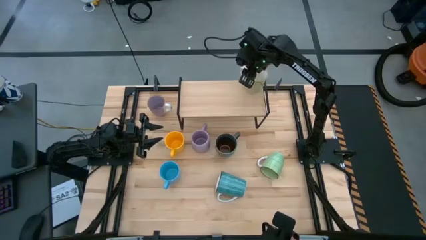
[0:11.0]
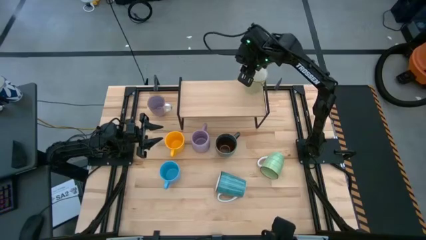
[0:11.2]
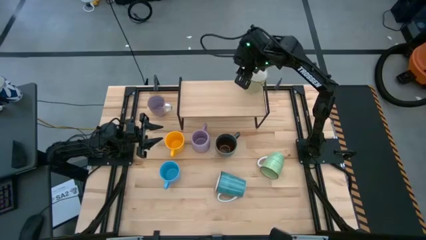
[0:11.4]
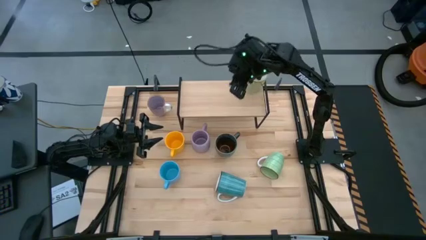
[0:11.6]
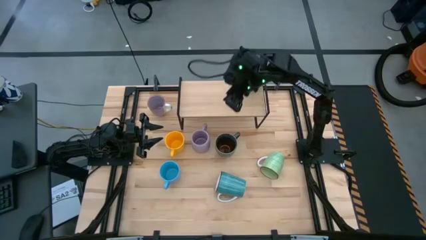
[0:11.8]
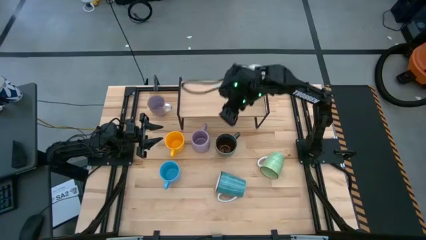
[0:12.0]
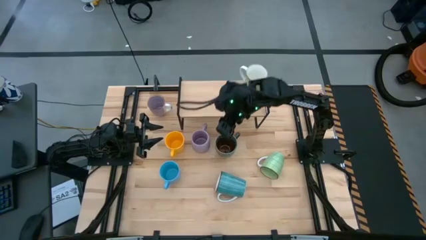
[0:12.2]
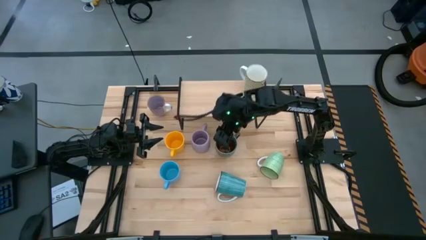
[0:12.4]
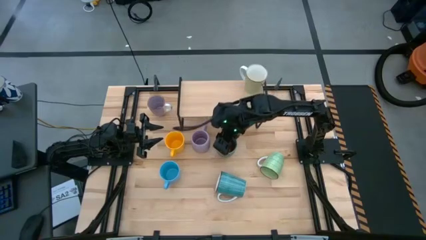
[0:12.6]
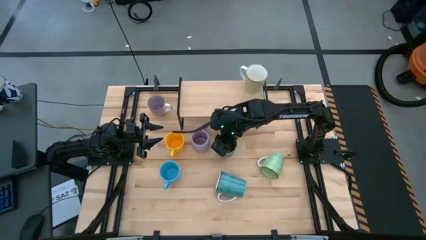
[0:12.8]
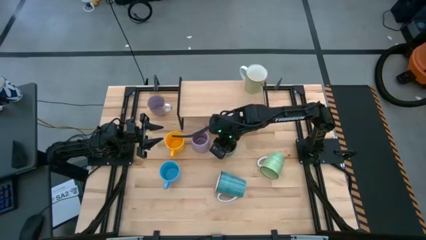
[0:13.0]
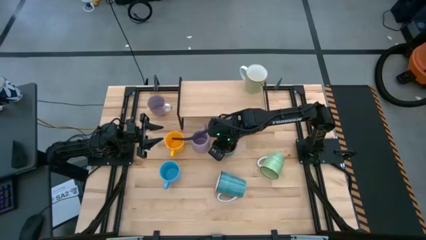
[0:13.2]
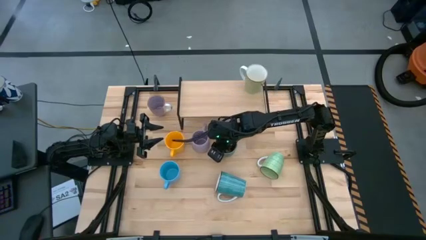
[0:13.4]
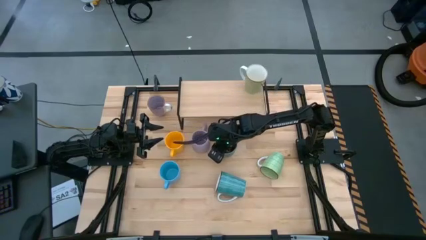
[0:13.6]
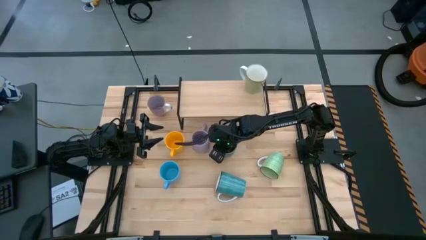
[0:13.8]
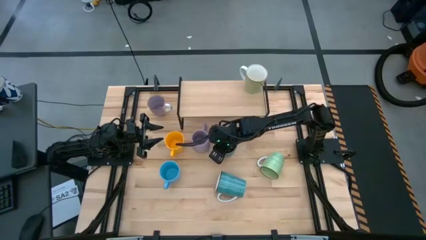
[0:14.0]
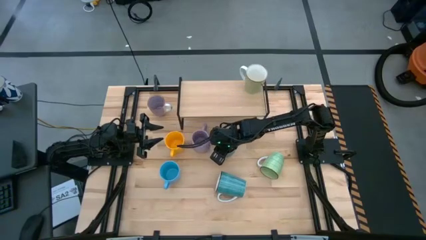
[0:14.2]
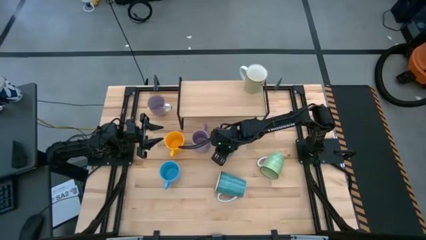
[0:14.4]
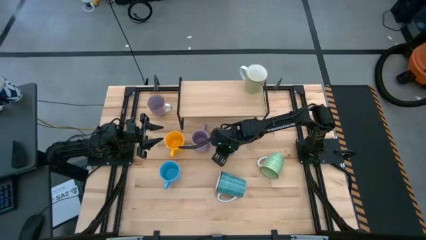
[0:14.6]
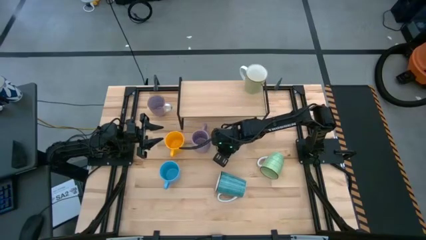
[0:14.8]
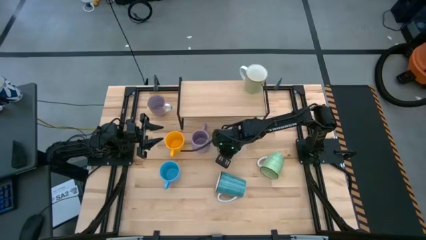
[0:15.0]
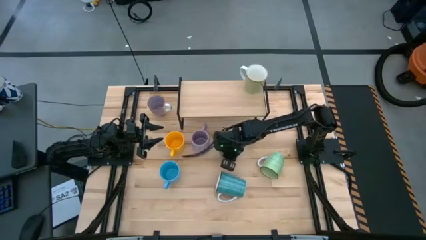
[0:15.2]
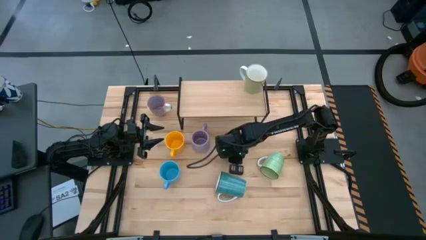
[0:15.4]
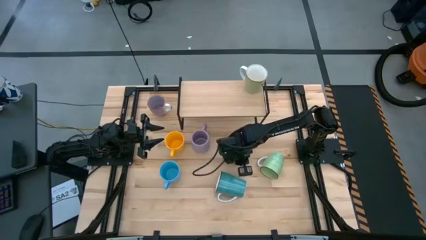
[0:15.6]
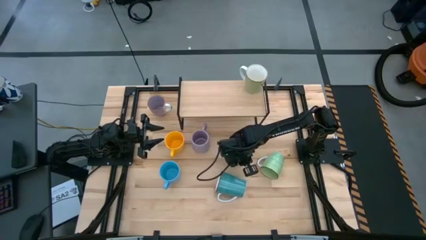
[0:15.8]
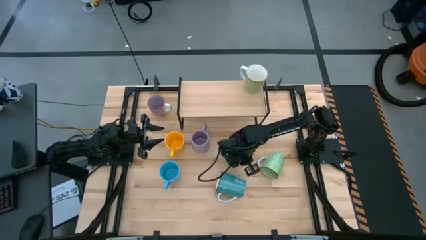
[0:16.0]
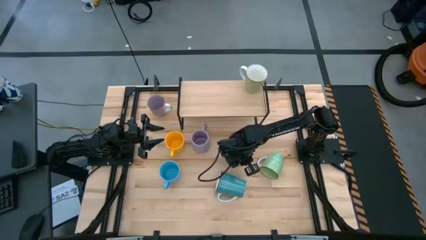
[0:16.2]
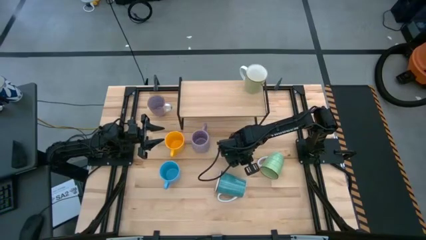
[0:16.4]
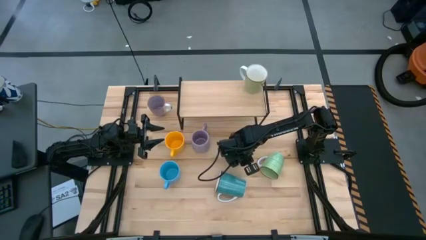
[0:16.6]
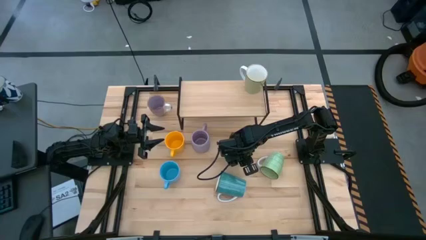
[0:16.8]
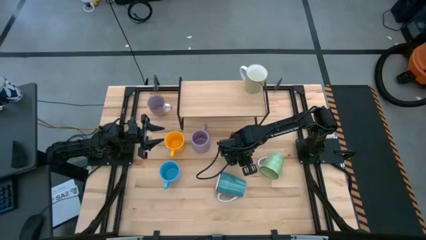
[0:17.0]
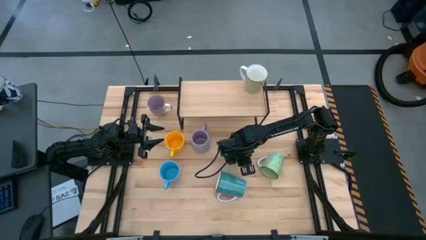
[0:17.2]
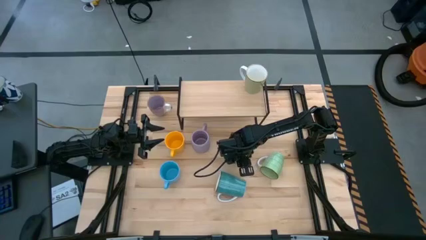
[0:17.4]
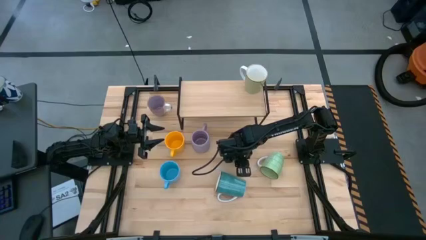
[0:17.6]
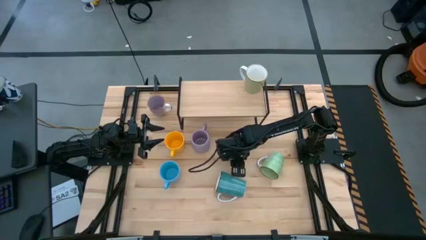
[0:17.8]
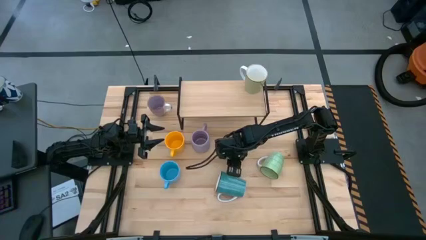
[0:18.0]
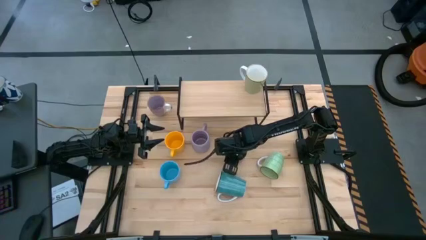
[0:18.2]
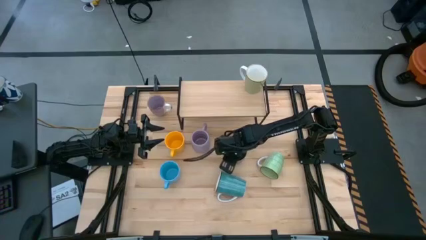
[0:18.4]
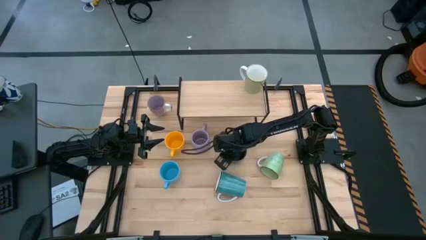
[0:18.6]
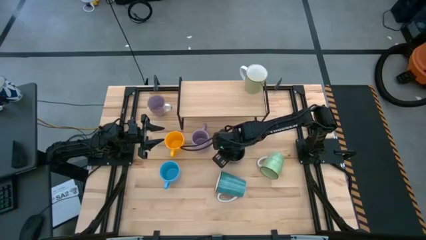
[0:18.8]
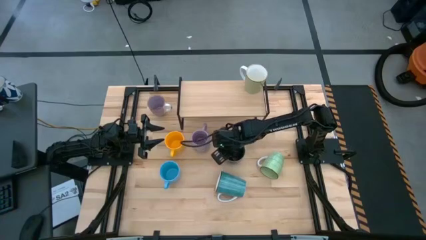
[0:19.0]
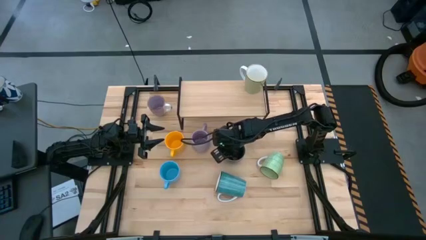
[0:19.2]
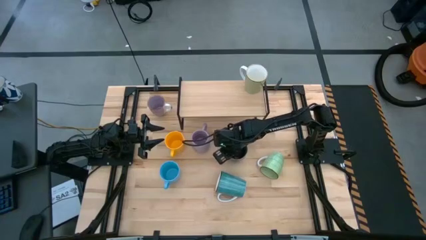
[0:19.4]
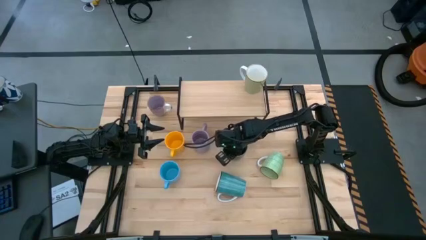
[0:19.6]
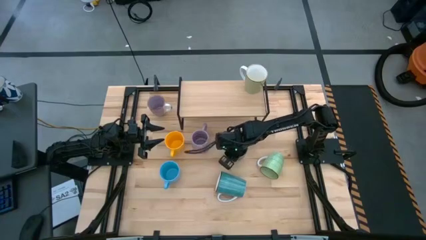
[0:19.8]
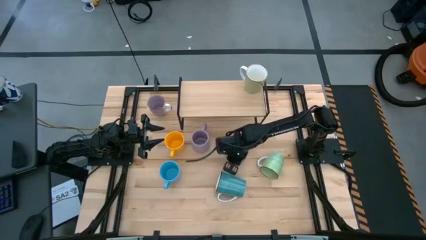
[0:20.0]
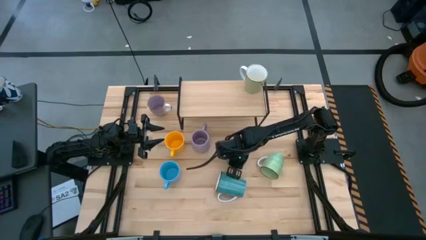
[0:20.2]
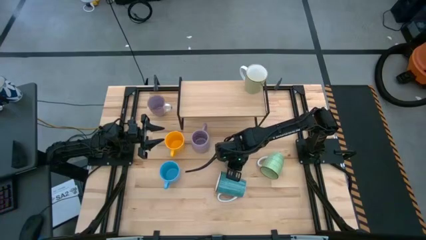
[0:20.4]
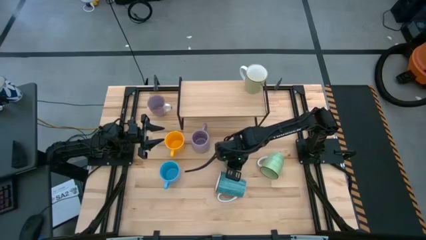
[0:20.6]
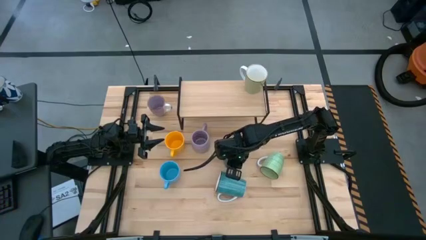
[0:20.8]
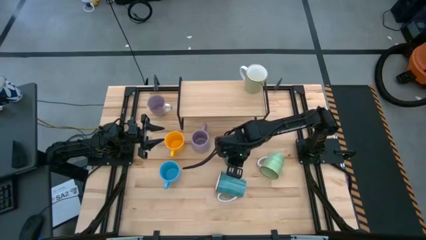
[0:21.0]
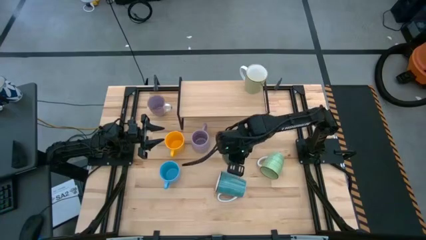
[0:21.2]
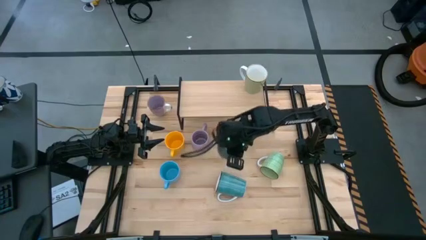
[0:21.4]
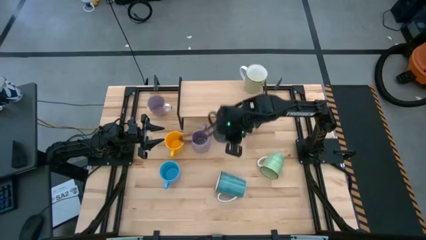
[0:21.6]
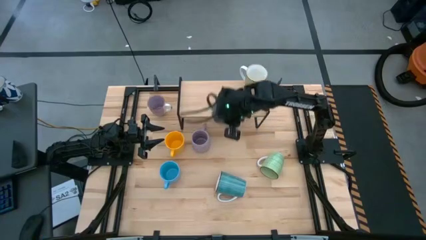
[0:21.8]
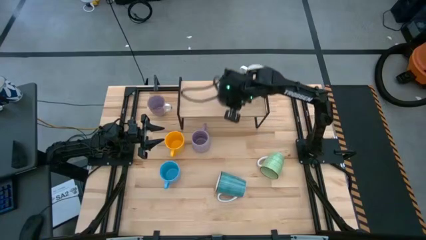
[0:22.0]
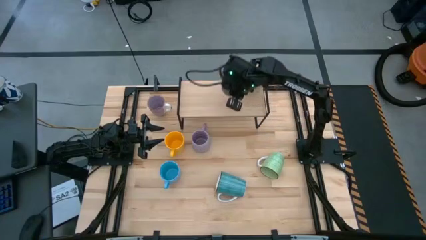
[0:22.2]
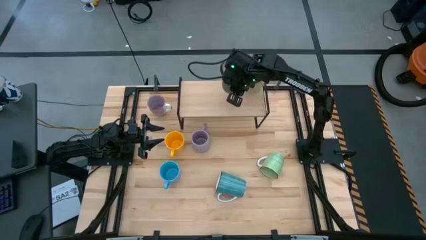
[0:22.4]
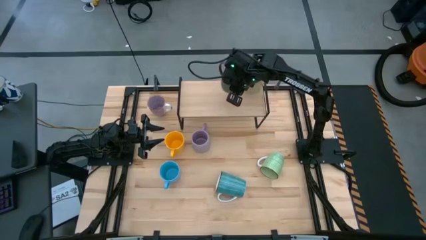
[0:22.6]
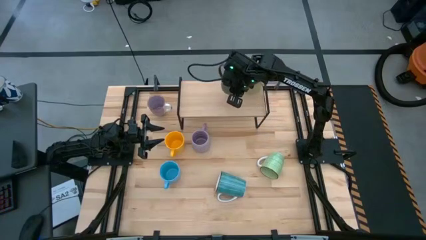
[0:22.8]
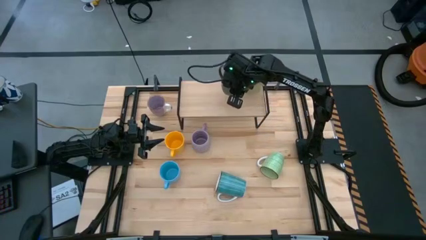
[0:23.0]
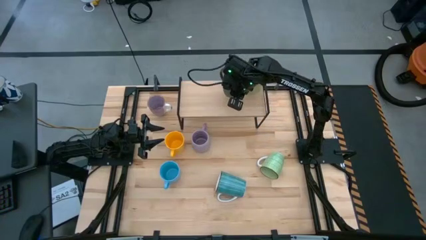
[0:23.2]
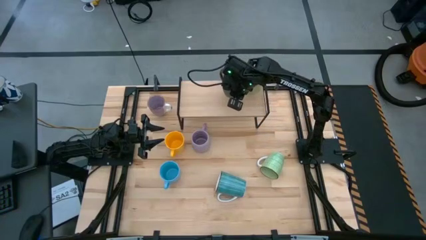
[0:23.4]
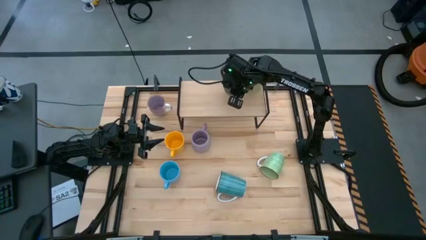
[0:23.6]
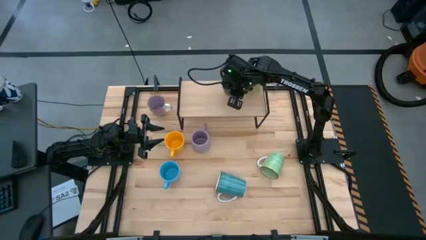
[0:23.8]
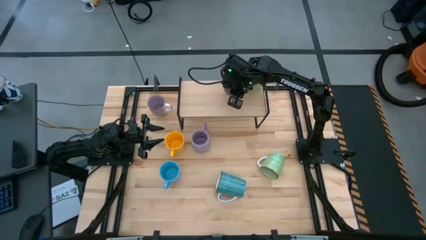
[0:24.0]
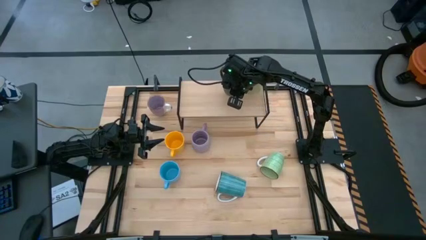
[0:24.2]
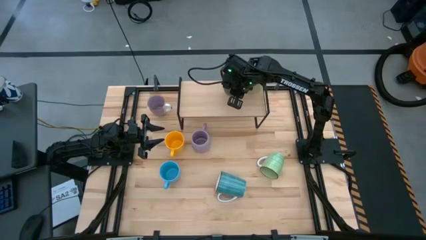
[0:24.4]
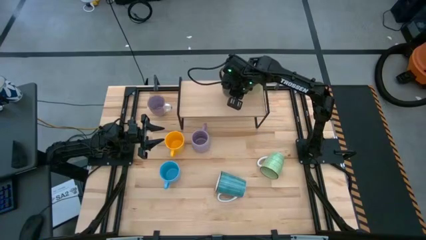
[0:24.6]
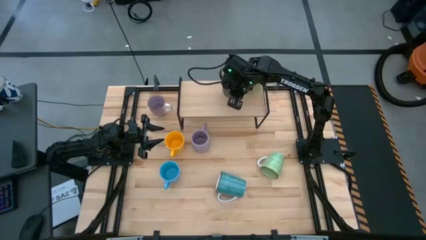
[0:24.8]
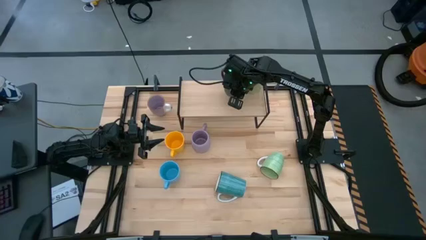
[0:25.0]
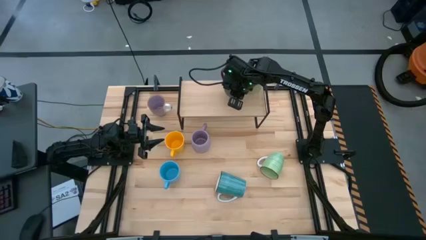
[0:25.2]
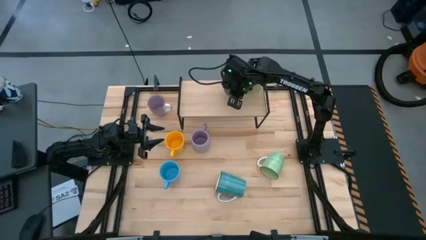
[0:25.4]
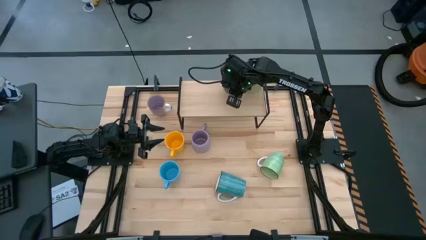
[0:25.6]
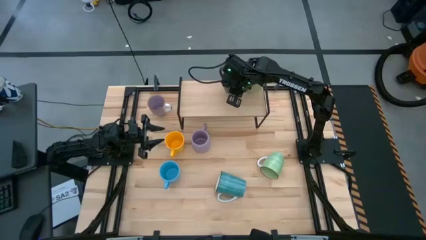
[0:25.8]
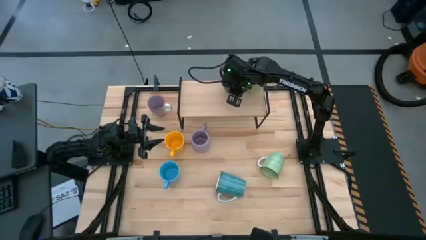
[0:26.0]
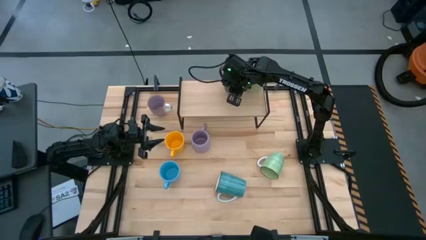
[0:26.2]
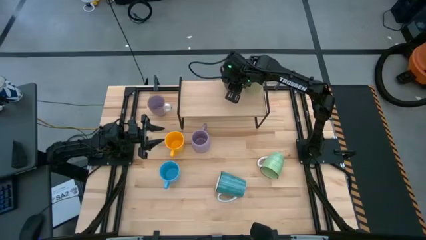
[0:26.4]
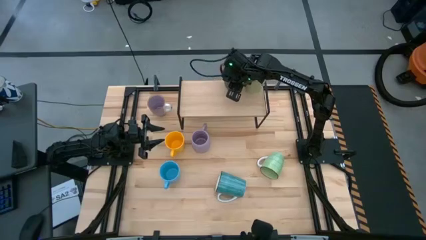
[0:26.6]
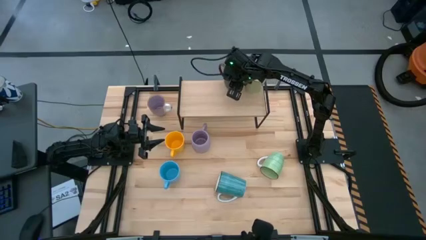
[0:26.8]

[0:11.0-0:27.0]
Task: Place coffee mugs
Put the dark green mug on the shelf
